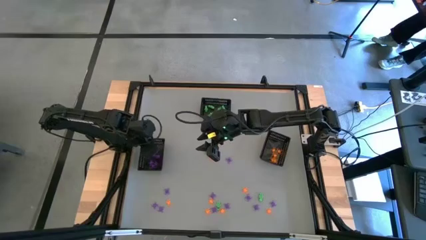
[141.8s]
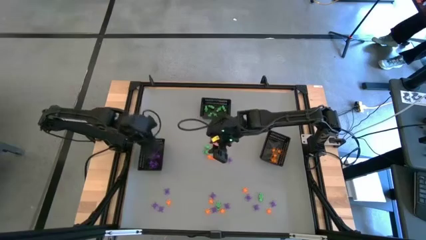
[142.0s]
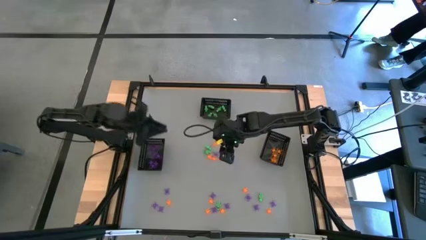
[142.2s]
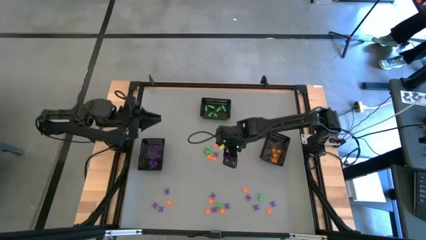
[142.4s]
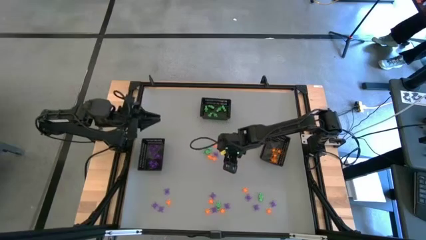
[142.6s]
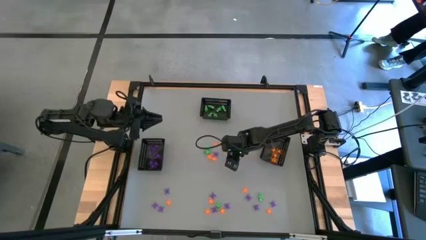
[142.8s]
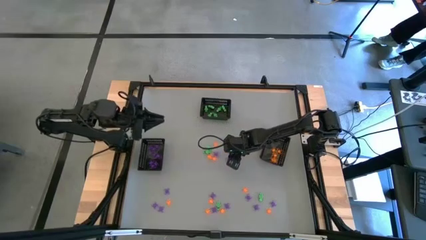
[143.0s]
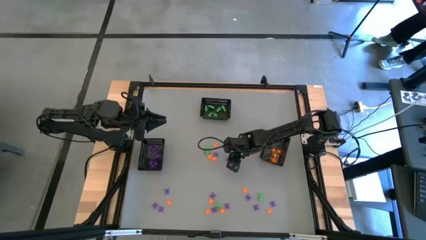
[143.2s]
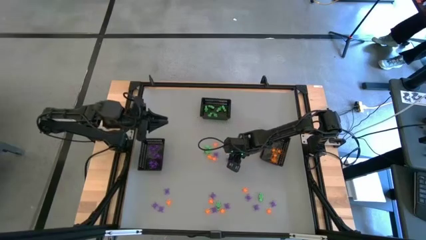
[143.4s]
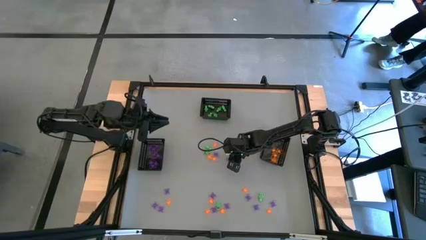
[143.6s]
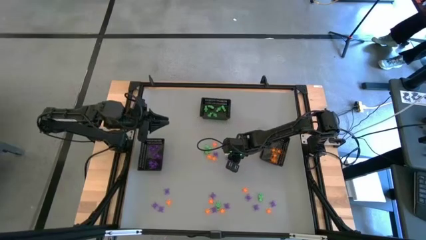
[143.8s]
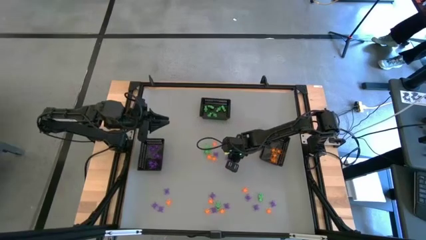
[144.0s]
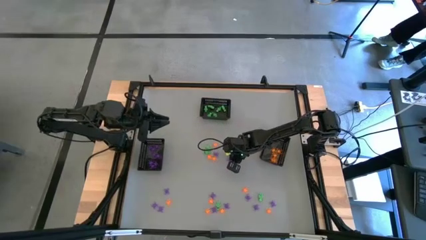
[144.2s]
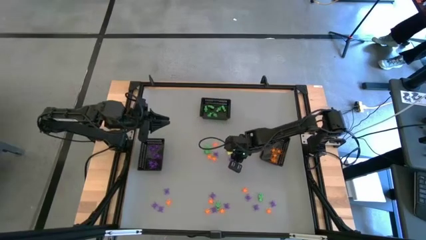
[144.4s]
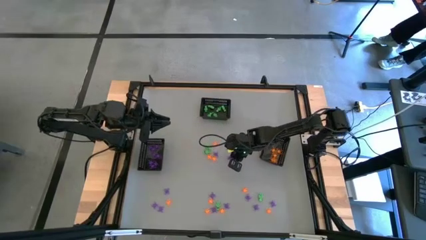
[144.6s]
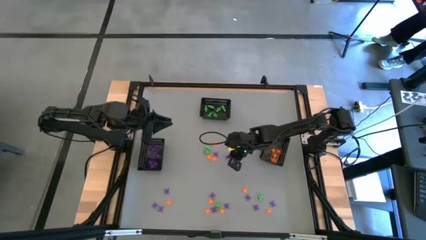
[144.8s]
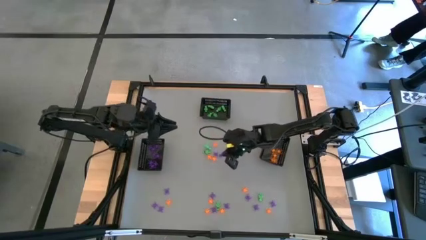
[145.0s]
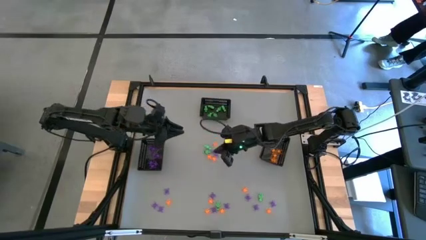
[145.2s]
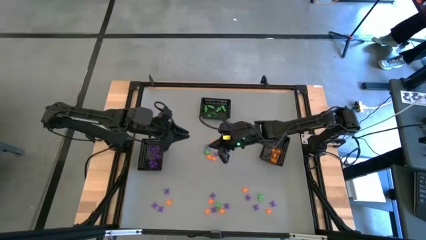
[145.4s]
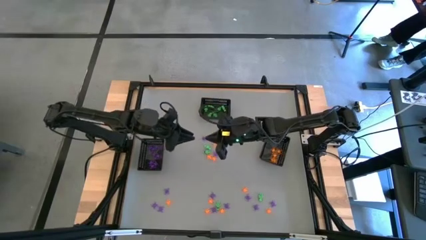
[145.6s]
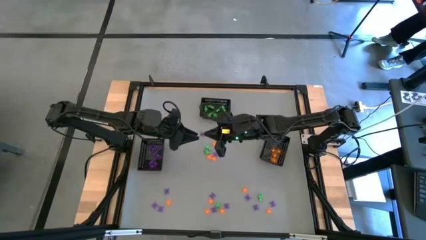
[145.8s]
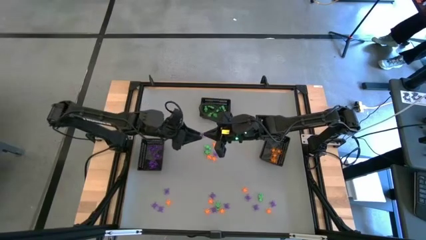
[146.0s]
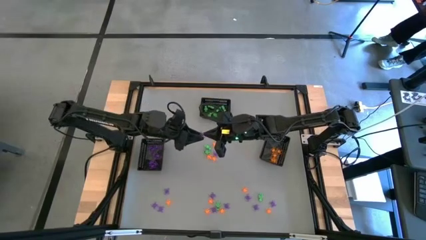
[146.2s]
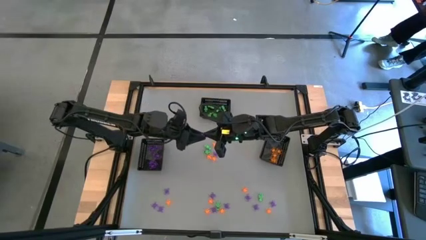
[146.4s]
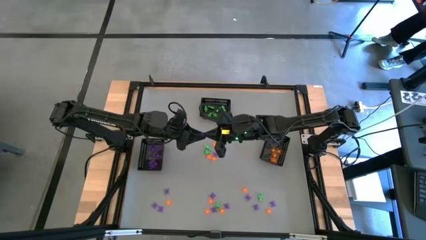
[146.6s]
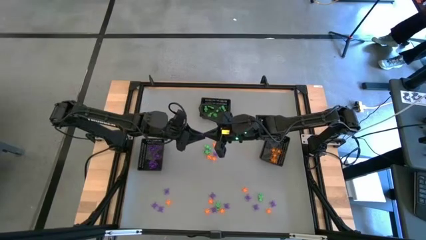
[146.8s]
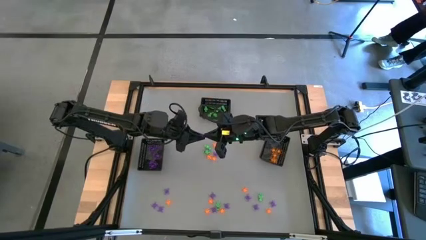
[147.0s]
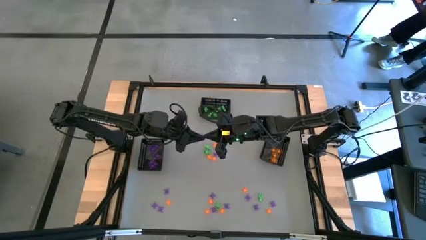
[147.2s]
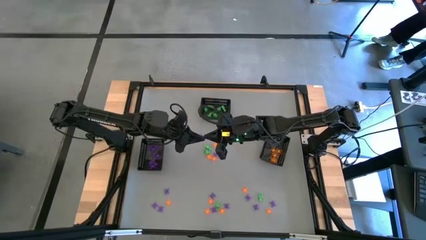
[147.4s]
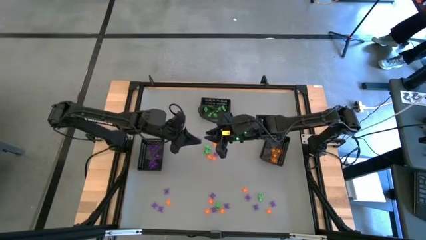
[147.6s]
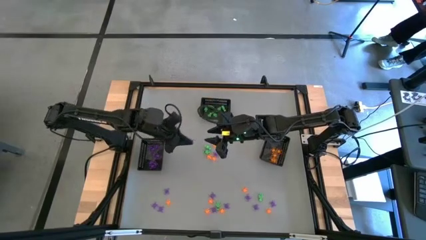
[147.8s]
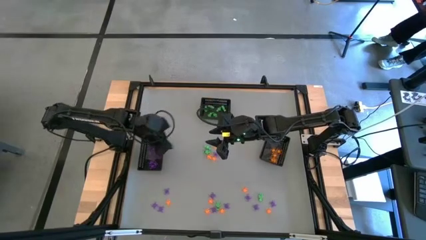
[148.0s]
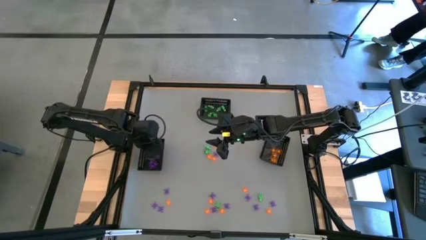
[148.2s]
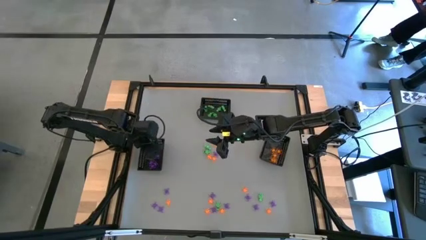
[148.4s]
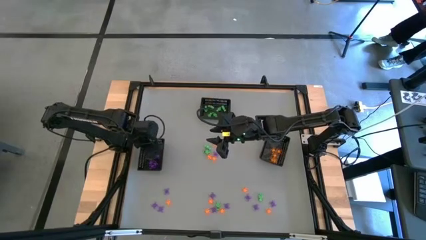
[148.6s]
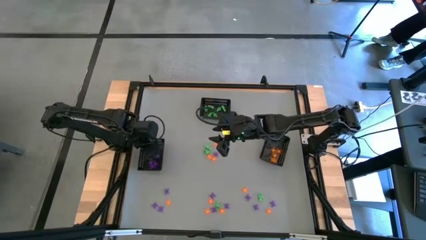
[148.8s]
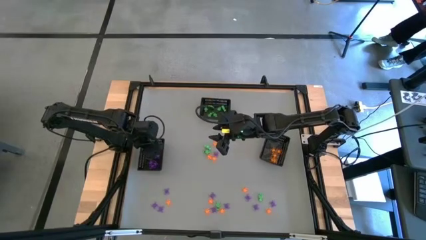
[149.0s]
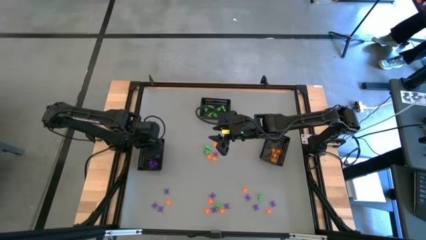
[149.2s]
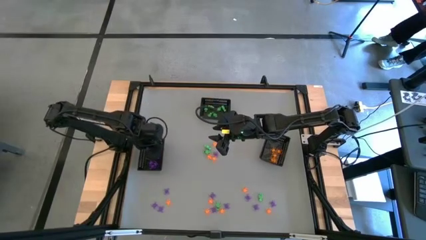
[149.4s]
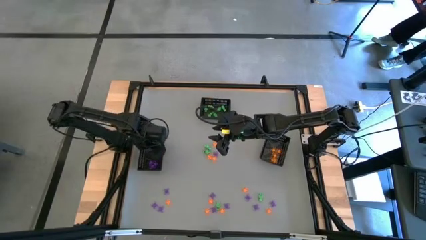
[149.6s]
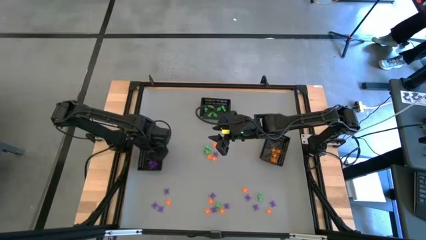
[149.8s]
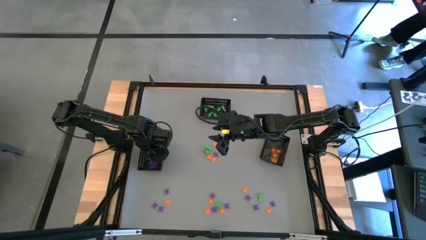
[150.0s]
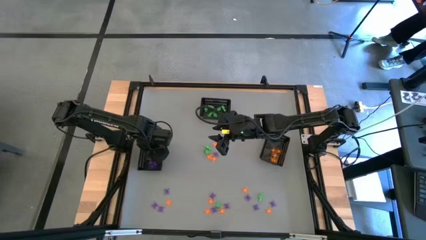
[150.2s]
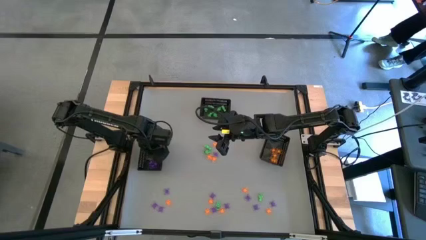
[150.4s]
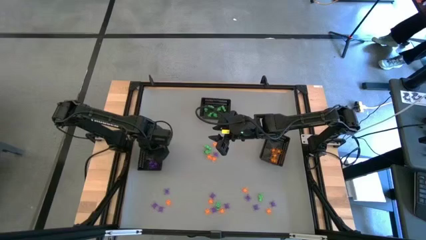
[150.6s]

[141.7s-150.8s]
Task: Sort Halloween decoration
Put the violet spider toy into the left bin

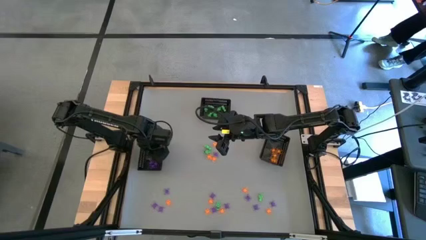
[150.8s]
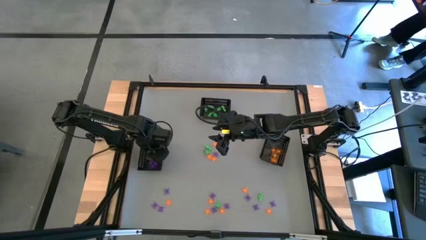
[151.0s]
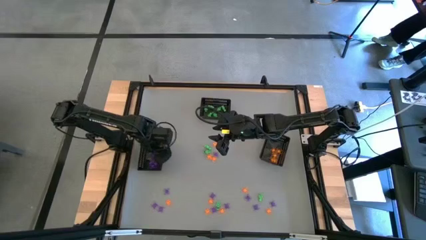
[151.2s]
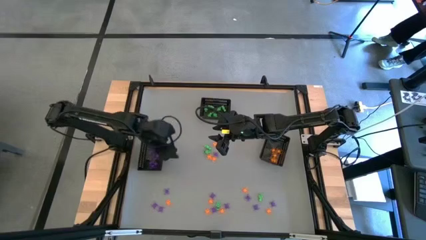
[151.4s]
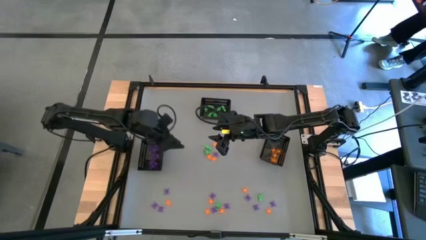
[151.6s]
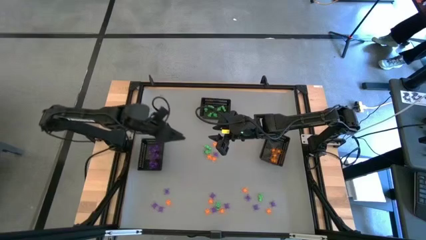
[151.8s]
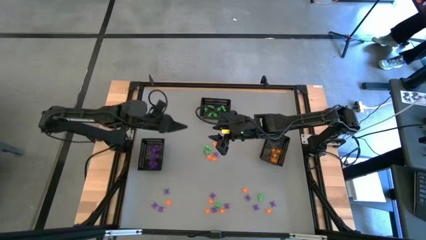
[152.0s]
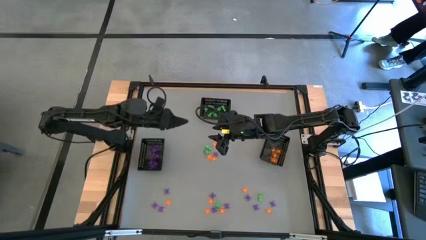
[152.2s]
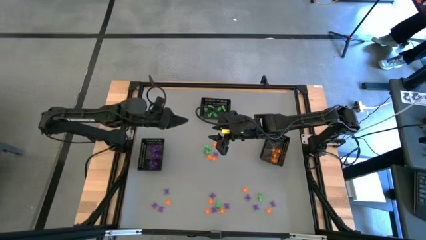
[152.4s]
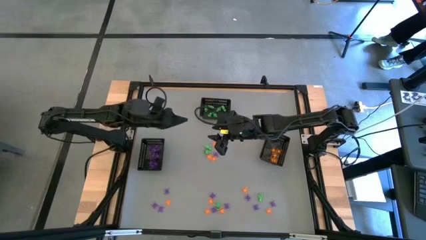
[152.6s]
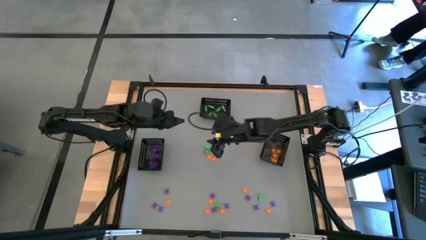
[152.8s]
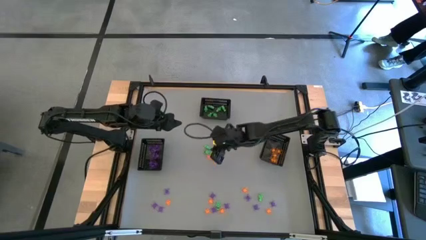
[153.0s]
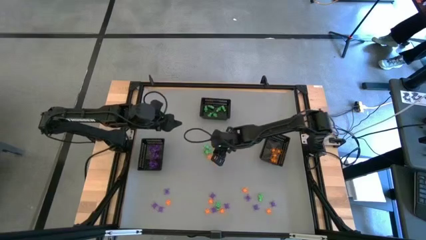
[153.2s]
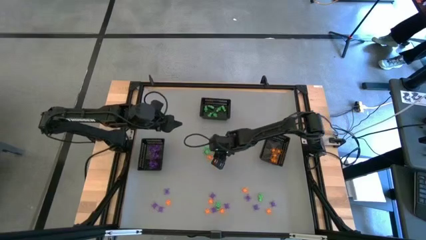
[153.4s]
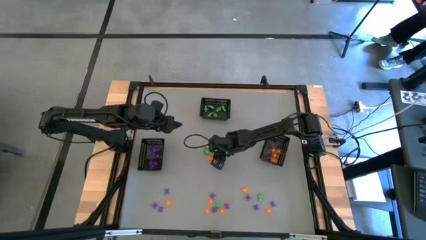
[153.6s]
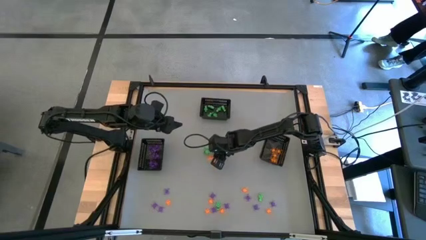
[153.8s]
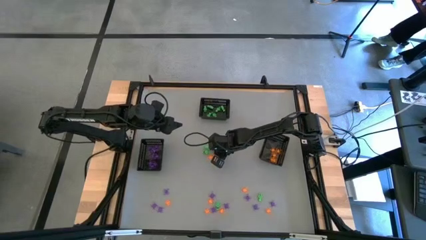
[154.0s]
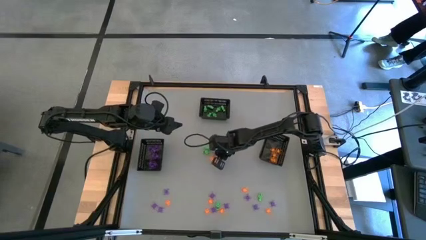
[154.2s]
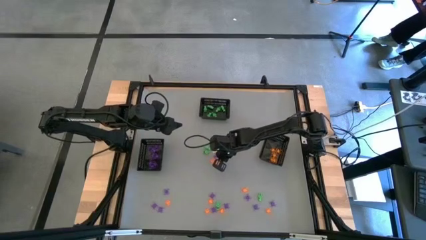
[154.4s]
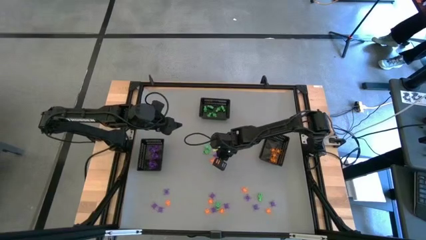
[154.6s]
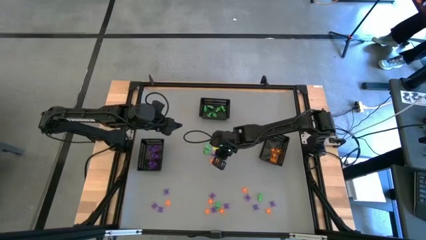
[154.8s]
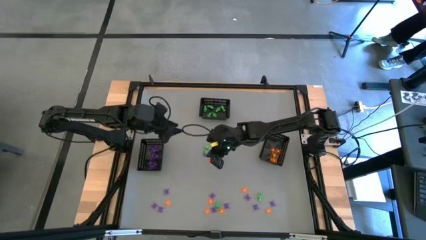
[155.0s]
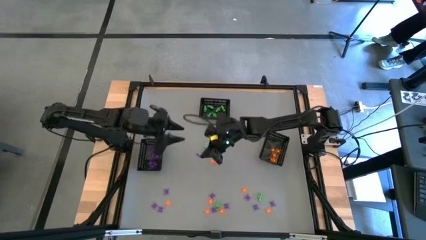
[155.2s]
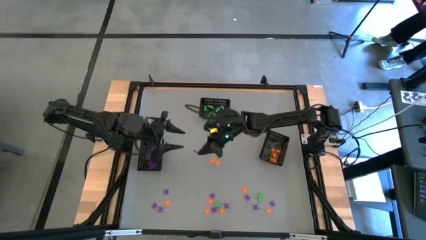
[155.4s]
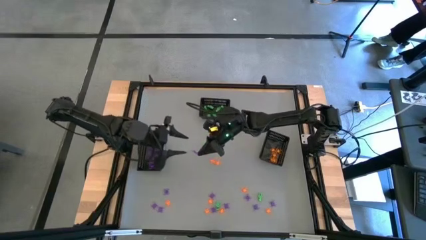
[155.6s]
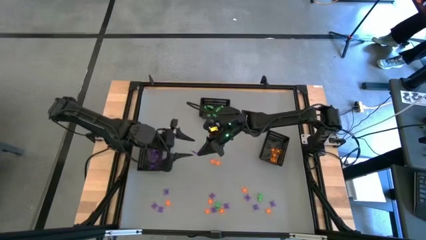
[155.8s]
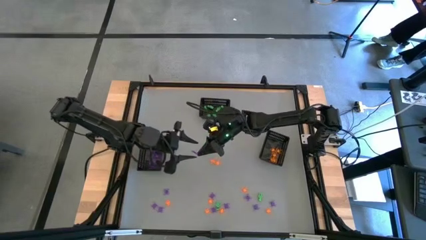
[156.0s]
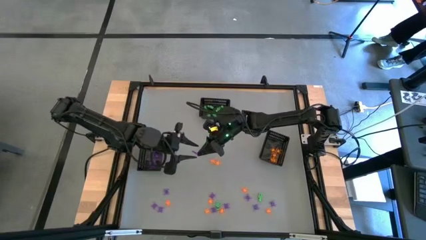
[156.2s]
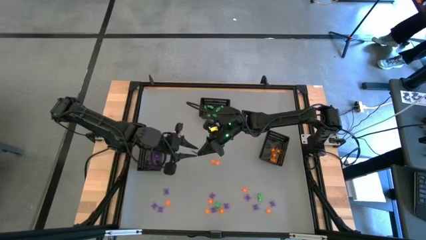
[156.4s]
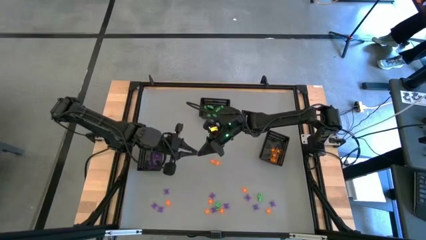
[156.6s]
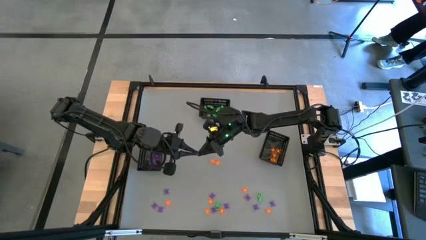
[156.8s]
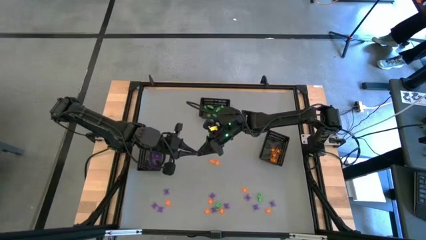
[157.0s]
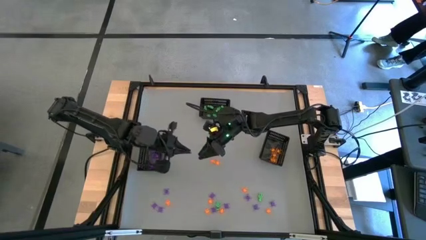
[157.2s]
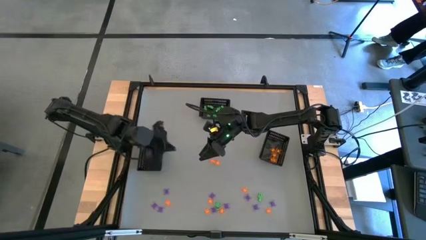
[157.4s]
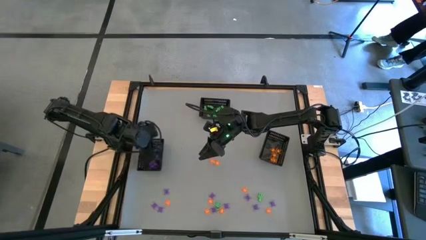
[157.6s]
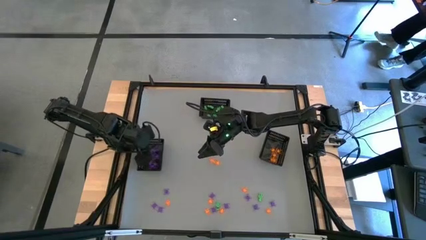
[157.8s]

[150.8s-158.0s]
Put the violet spider toy into the left bin

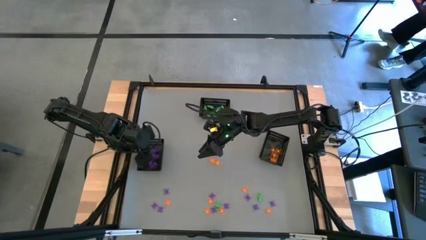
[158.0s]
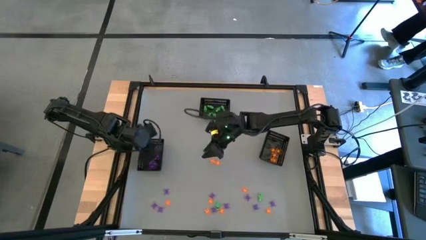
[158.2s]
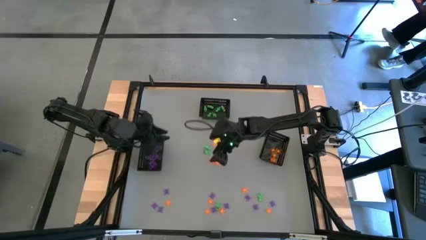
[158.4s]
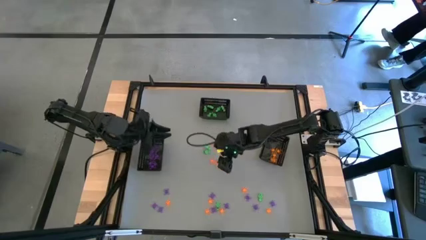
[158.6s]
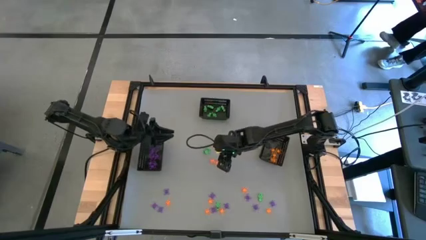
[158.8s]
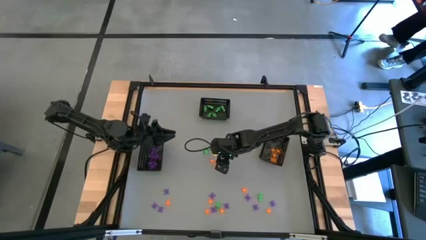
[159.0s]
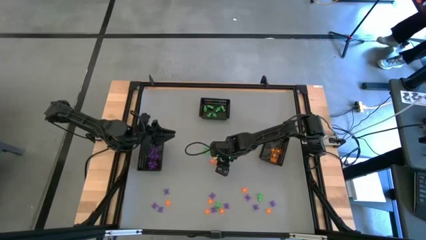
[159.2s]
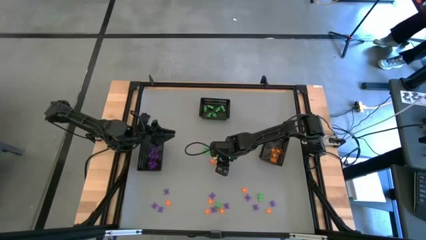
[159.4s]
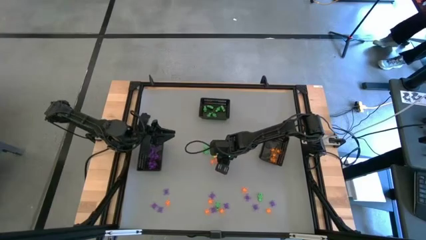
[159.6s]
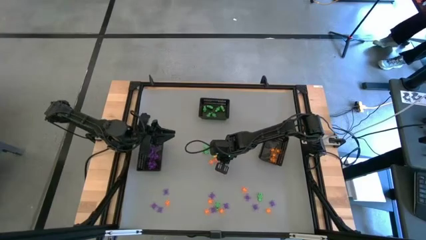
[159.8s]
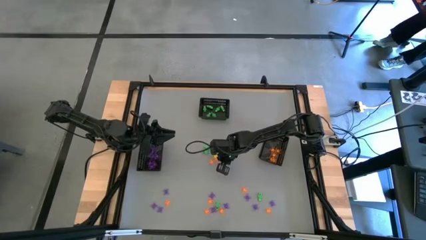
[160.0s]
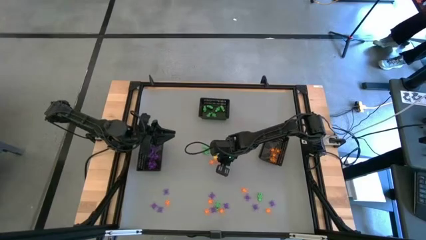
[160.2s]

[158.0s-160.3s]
Put the orange spider toy into the right bin
